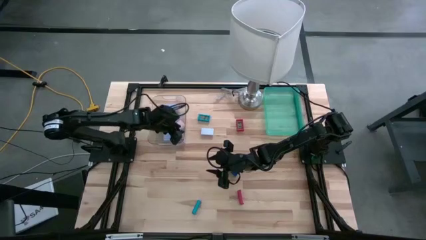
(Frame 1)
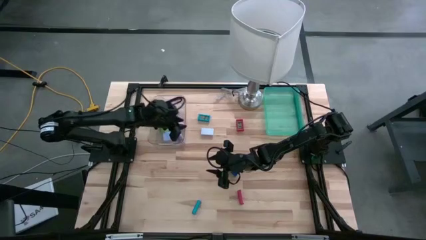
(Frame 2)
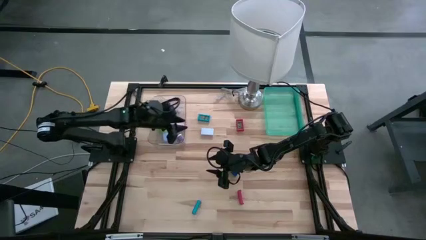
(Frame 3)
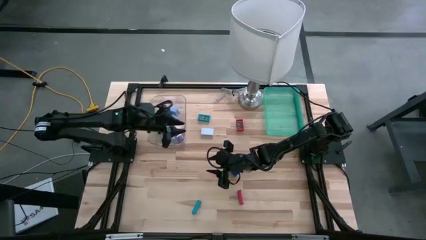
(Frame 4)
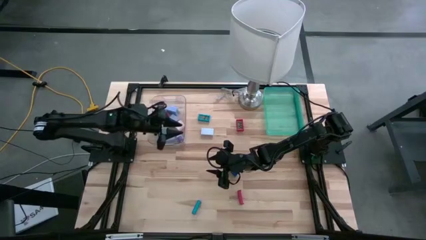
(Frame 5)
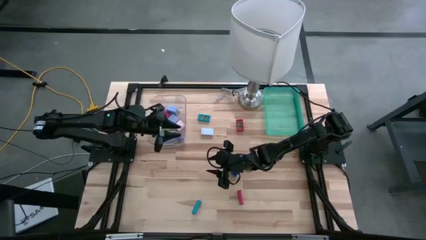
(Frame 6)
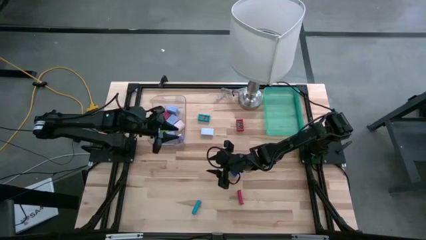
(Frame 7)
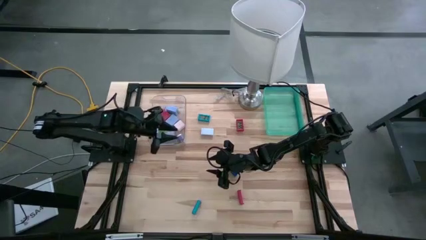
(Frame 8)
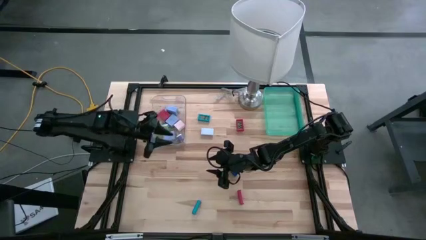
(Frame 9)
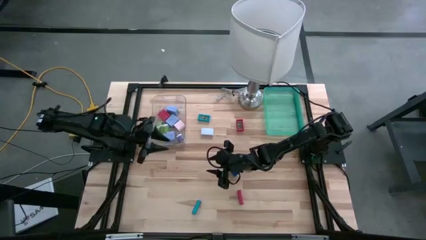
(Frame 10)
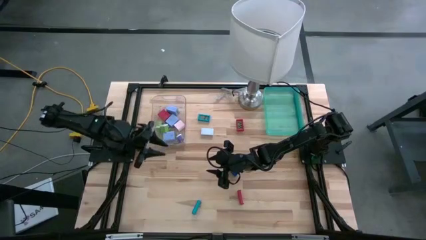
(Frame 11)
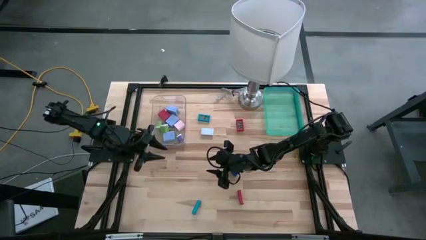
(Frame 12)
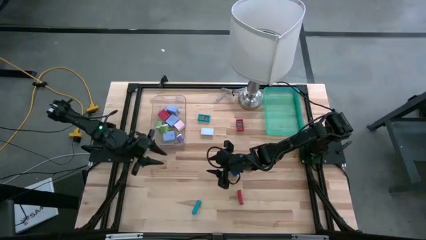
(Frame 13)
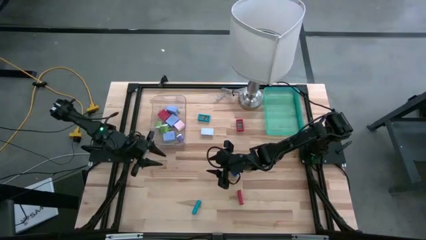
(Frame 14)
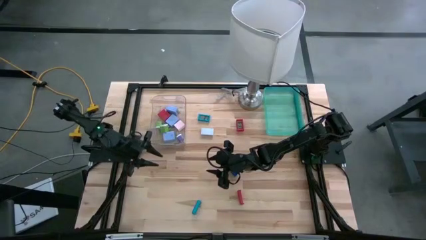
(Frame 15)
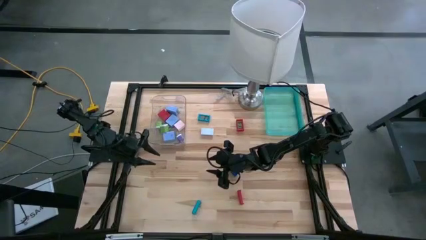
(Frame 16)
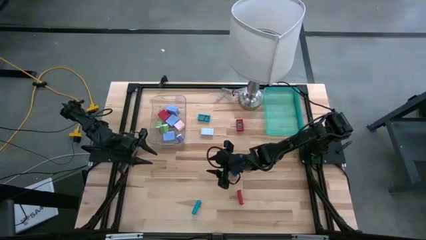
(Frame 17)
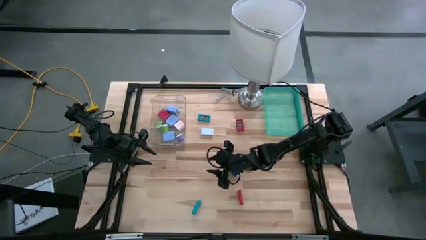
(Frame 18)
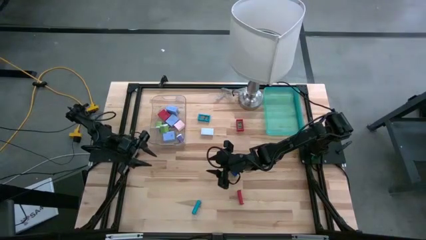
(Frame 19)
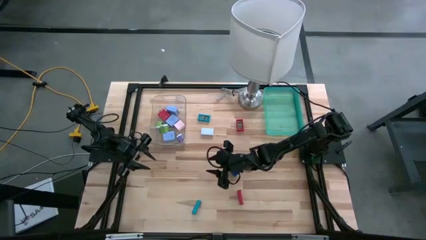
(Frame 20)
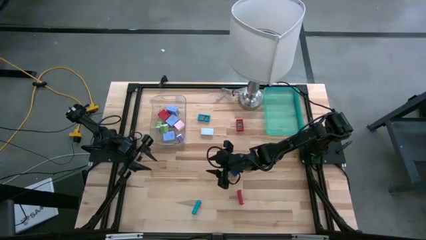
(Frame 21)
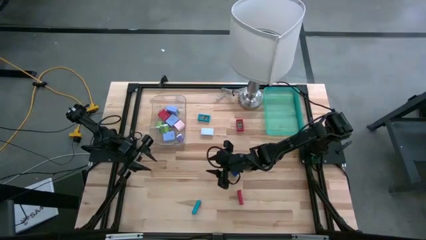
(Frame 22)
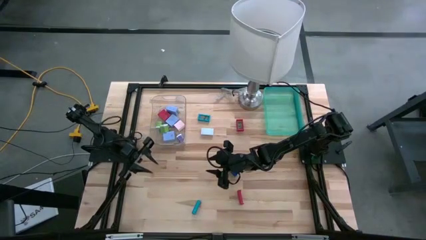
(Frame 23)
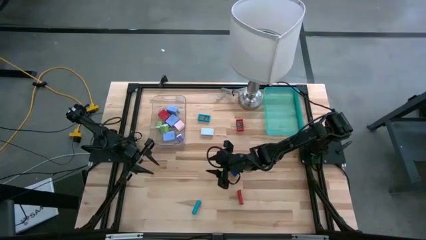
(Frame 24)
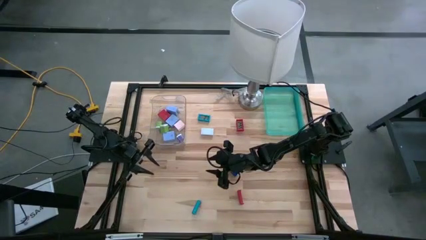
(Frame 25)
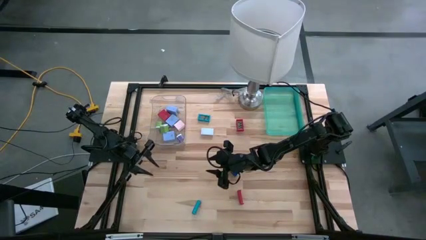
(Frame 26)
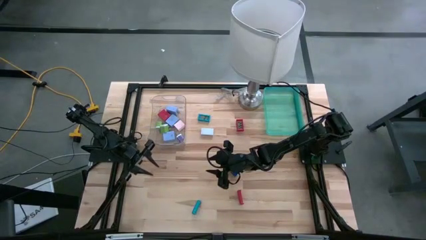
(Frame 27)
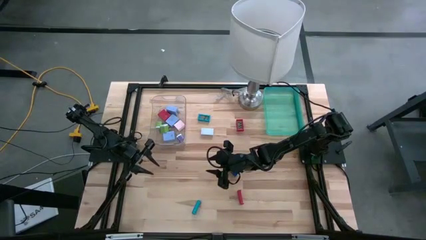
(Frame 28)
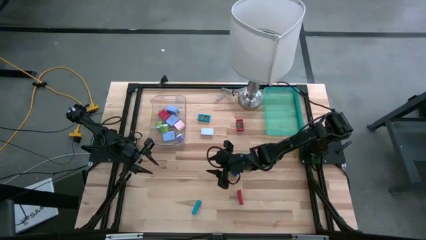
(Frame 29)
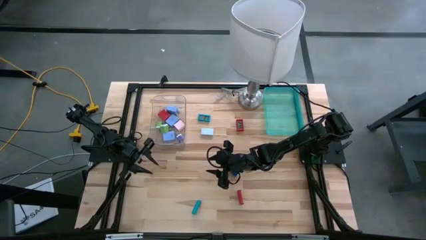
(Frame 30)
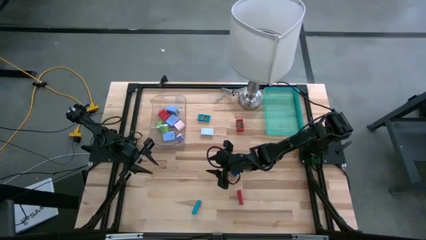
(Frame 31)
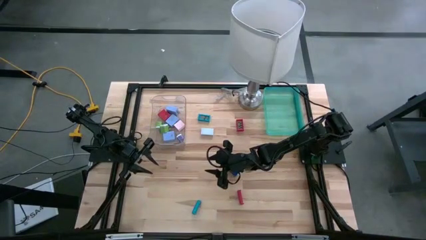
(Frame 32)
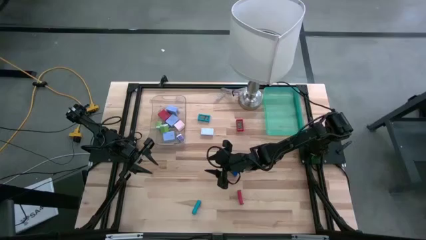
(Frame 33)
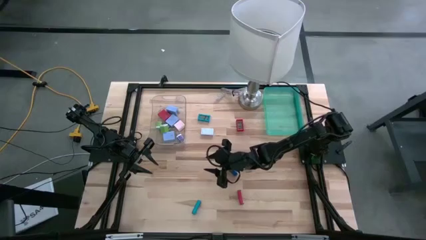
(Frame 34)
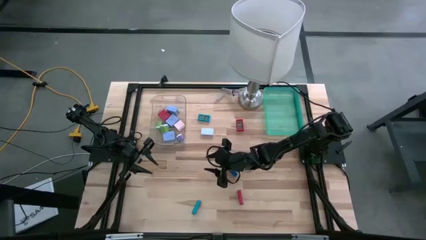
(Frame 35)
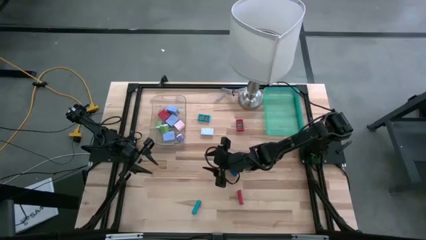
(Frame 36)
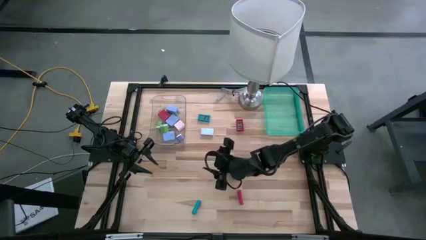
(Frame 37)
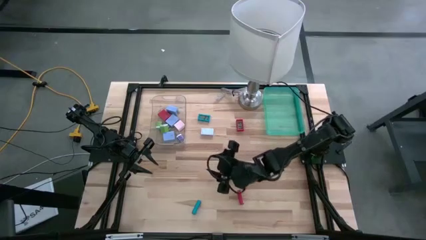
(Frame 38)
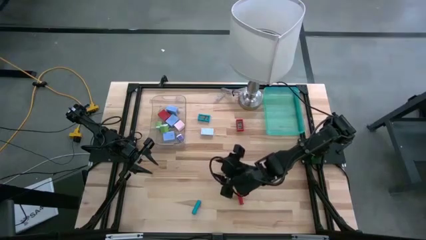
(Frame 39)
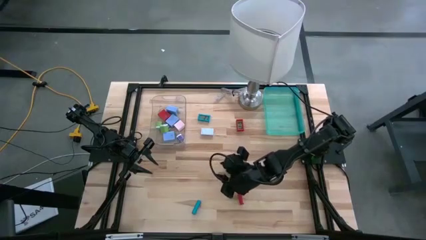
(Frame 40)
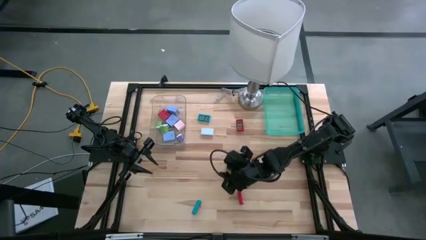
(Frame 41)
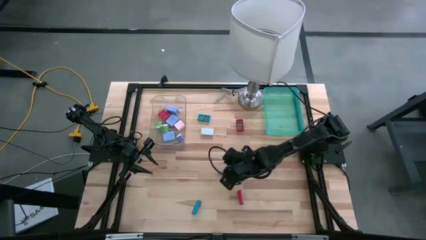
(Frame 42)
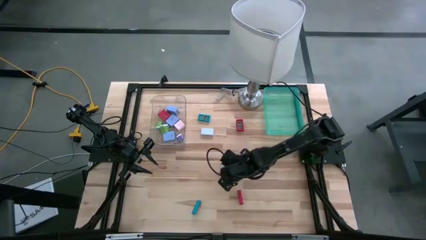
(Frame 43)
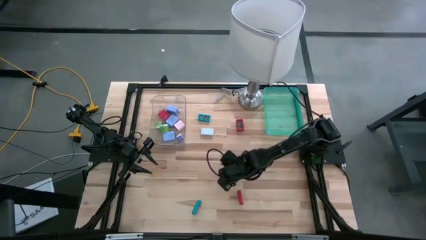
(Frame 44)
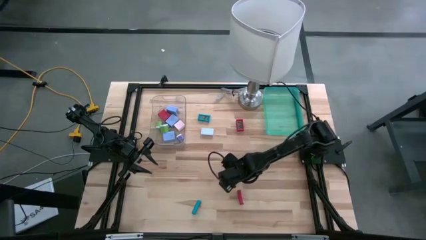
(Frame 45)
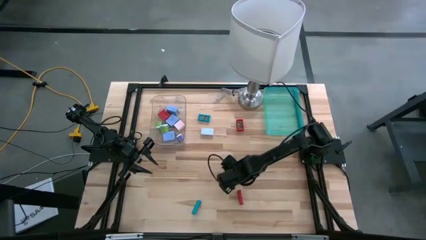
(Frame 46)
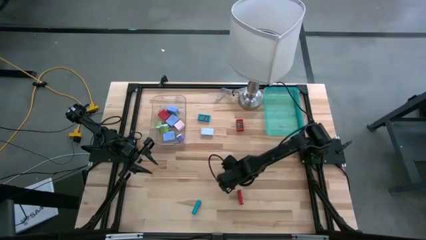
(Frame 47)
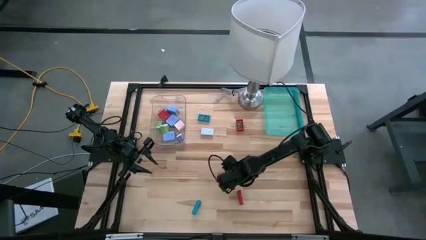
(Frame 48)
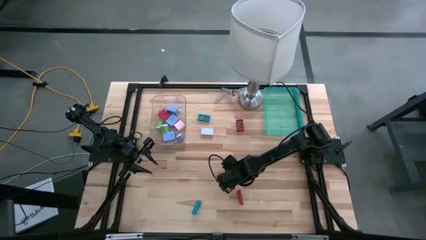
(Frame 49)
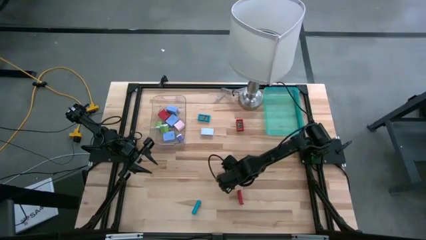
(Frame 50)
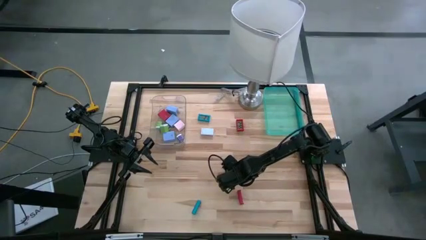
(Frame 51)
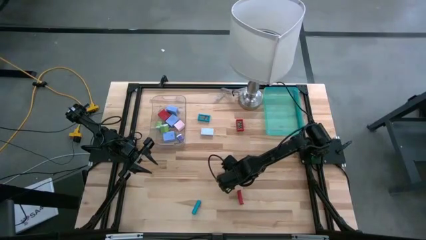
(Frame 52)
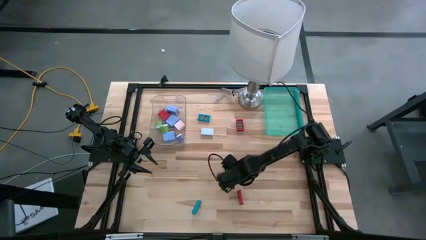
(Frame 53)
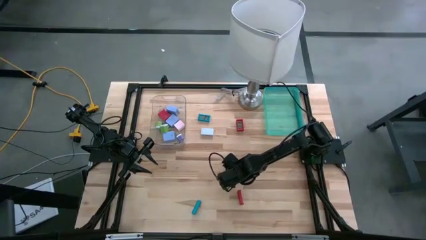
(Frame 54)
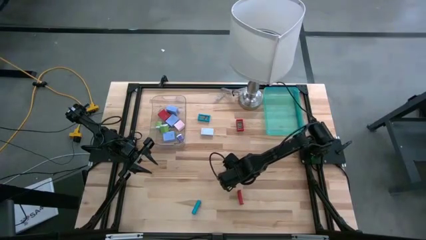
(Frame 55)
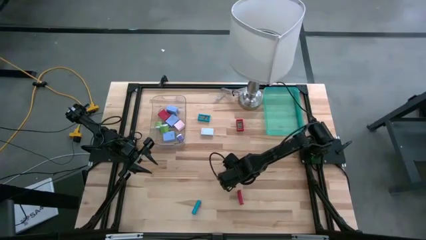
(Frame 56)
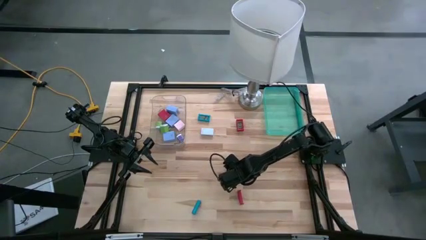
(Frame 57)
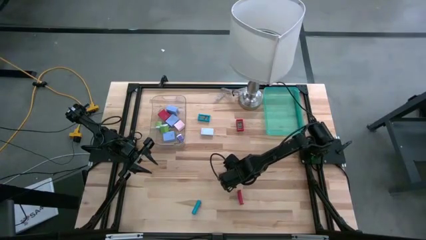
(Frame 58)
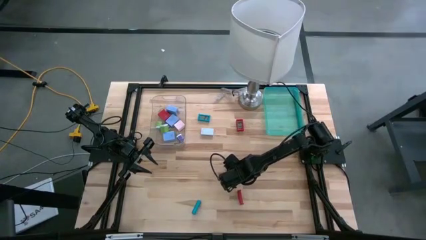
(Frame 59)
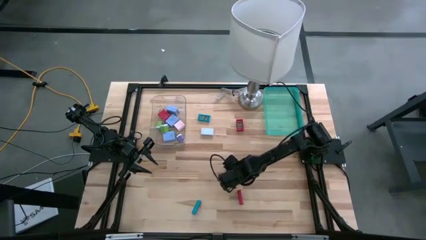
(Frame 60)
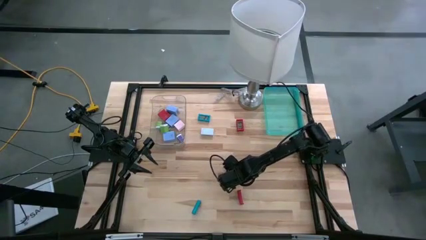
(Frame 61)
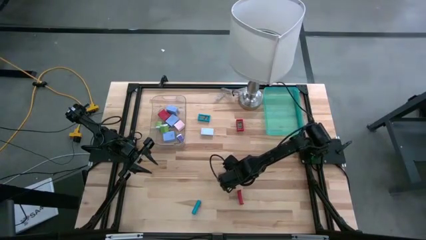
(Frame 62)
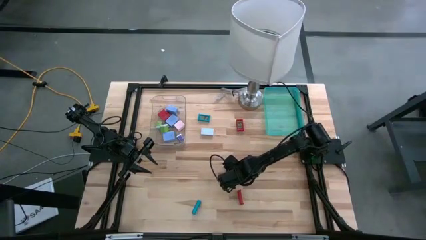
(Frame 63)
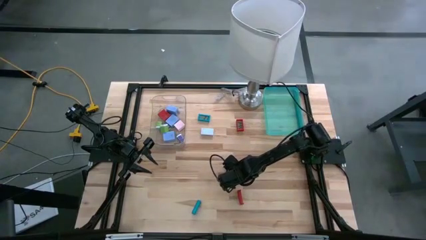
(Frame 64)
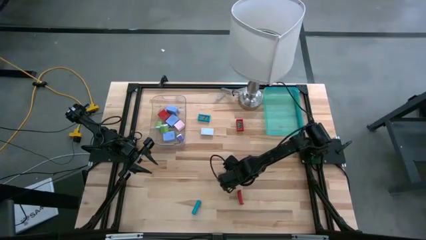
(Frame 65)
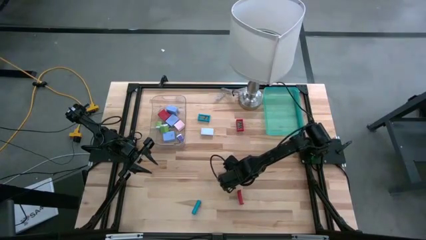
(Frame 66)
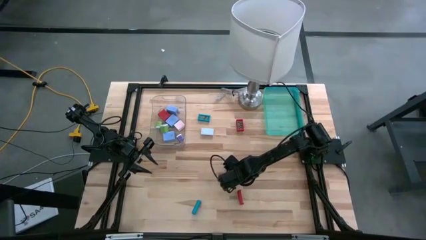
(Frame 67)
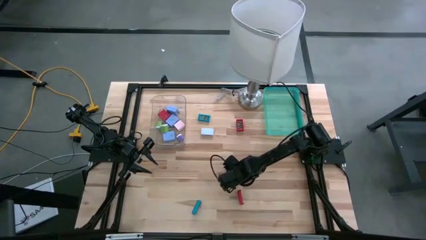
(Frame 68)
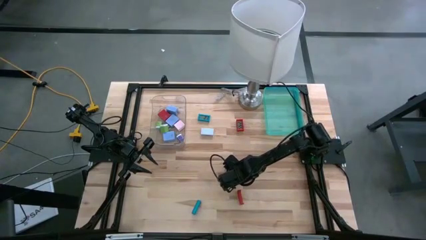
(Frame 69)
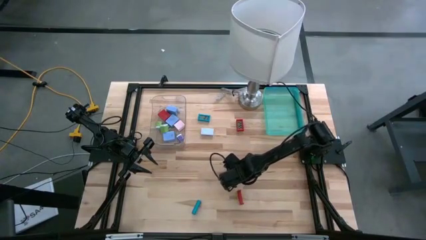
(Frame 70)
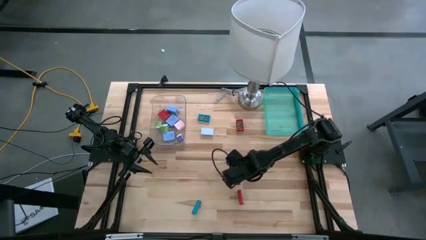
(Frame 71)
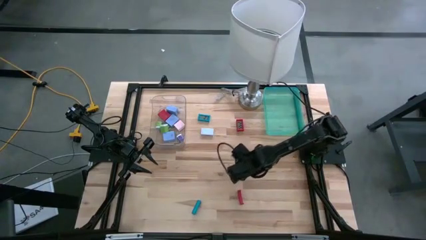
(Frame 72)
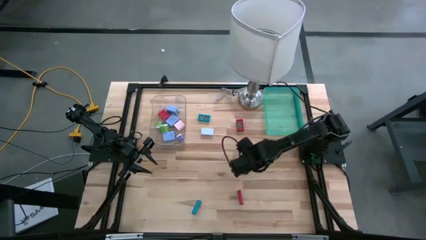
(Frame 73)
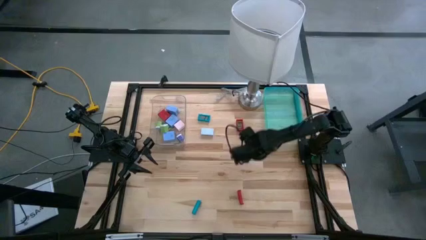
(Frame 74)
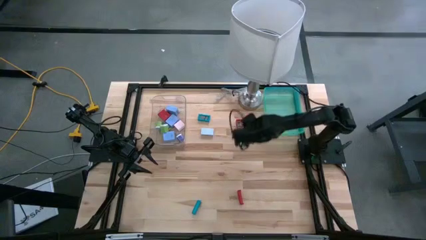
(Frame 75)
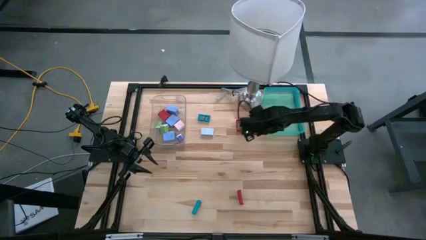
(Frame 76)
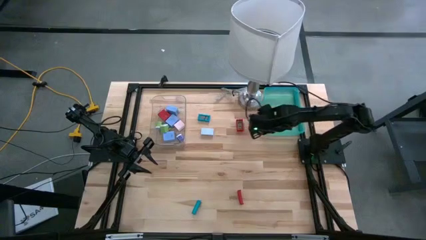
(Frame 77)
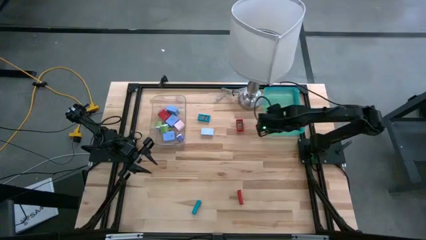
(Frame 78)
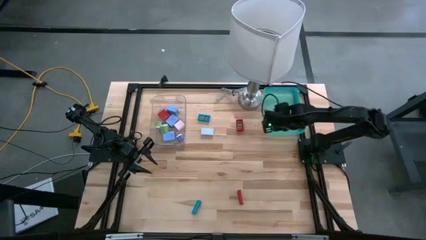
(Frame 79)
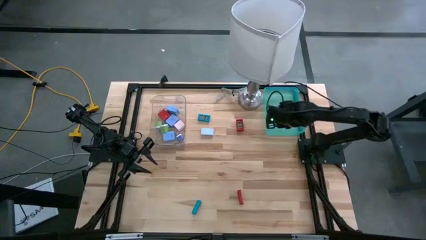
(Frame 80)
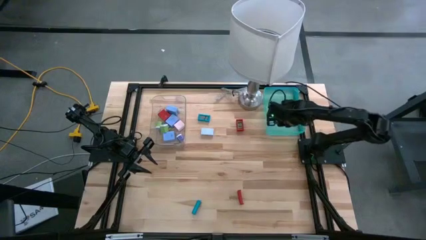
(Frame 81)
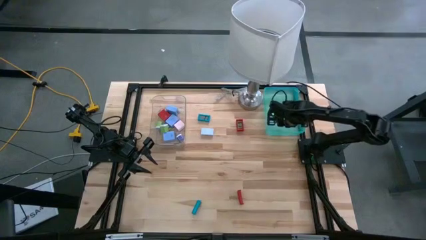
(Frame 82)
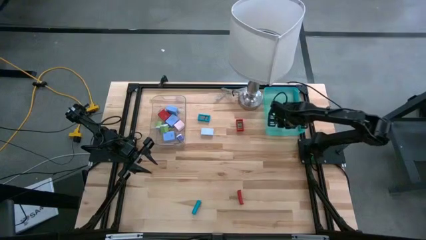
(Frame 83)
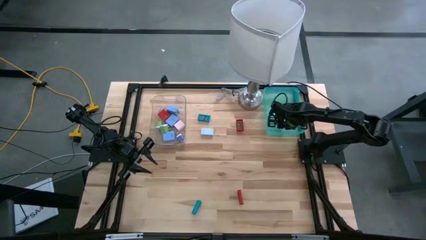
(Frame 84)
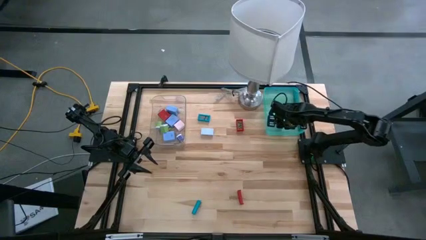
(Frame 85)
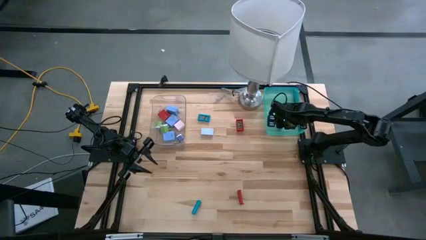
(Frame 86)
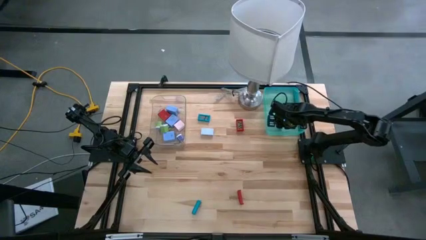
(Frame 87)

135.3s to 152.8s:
Task: Pick & Place Office items
Put the blue mini digital clock into the light blue bin
